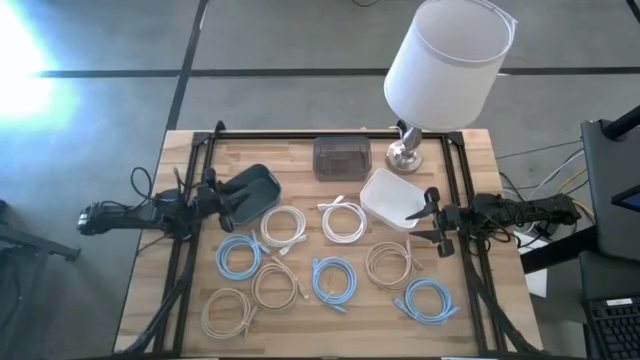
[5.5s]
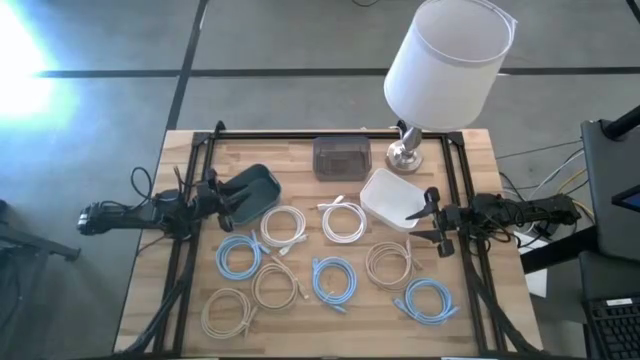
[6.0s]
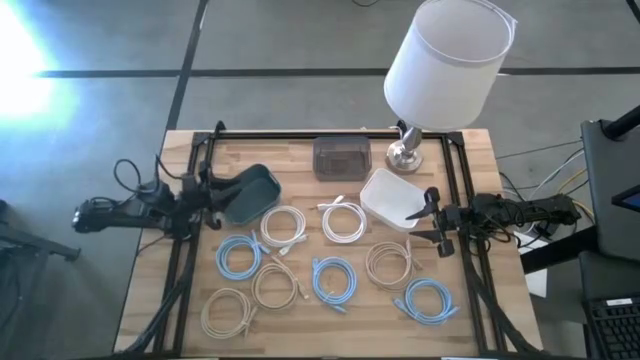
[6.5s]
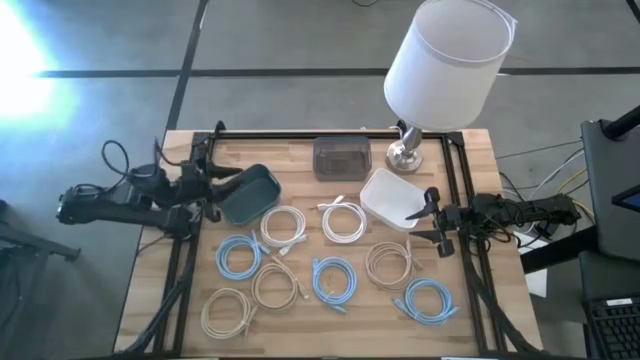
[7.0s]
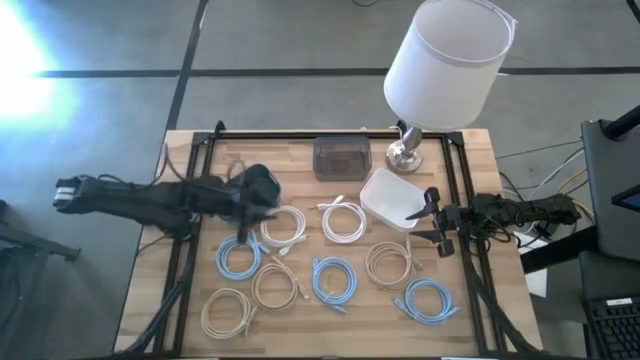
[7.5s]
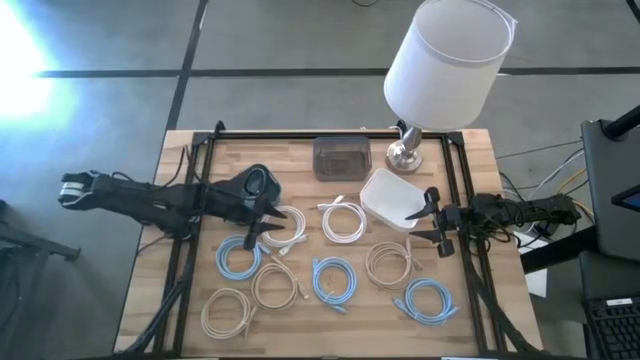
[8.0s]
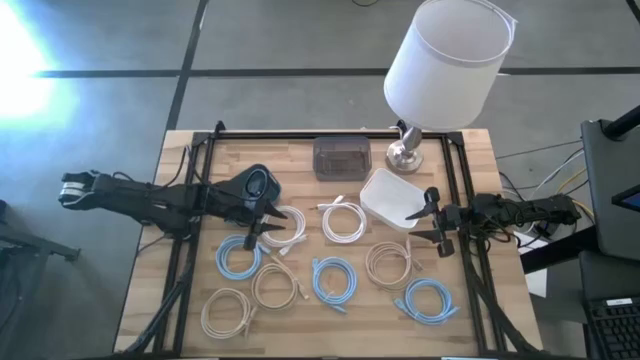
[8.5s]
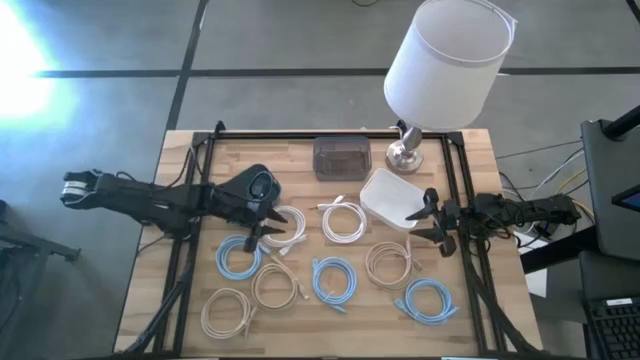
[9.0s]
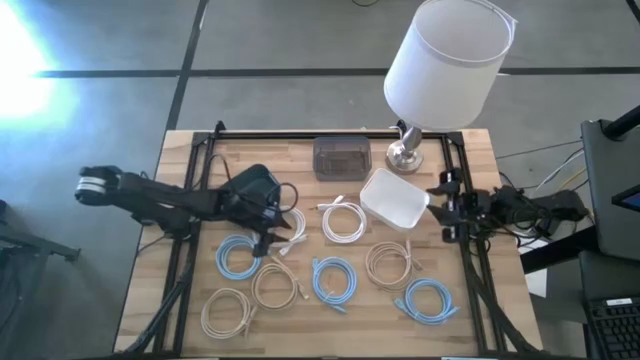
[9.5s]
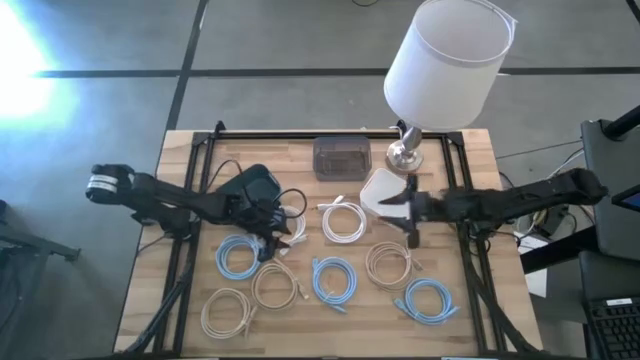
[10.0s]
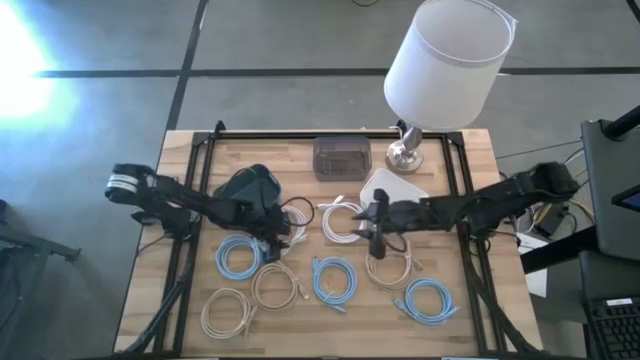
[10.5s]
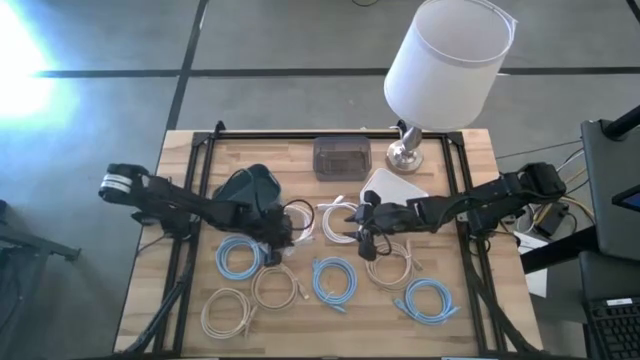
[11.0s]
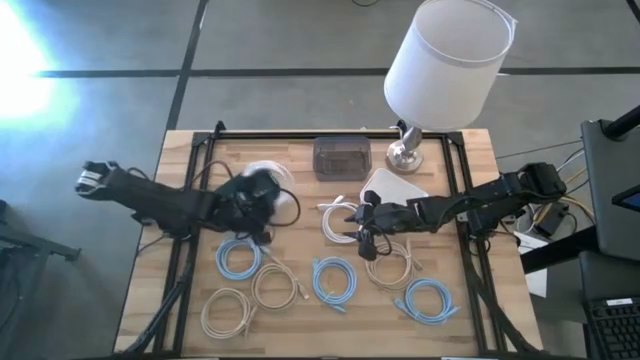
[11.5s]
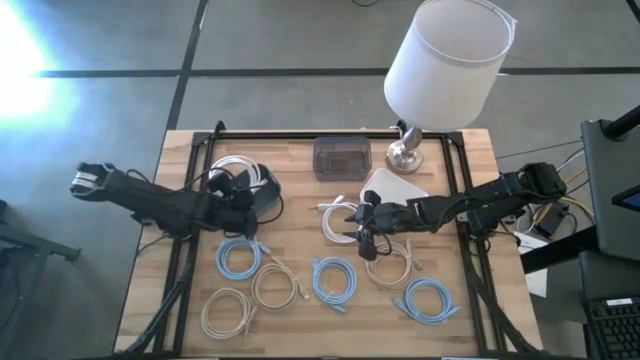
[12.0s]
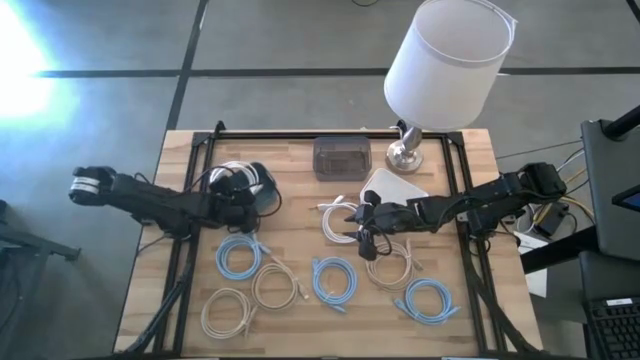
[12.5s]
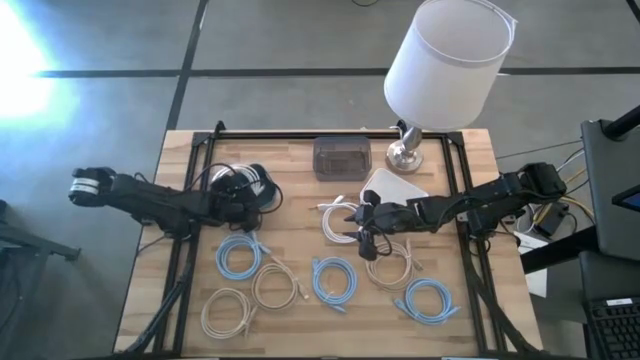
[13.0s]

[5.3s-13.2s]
Task: Sort HDMI cables
Put the left white HDMI cable into the blue bin

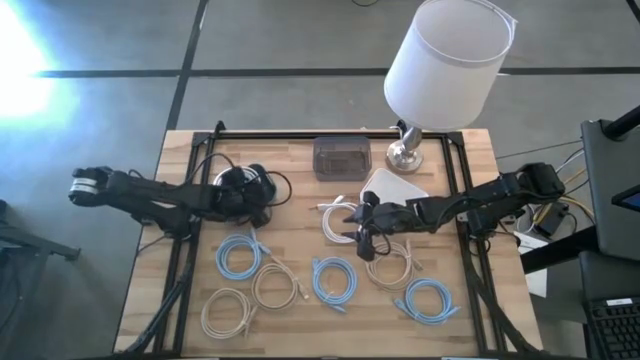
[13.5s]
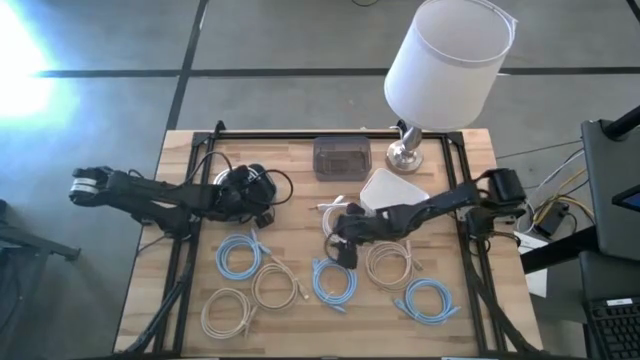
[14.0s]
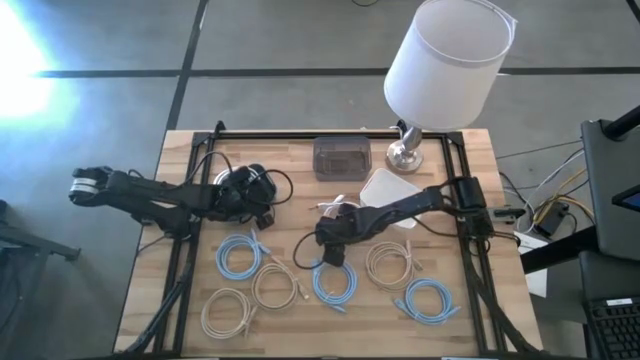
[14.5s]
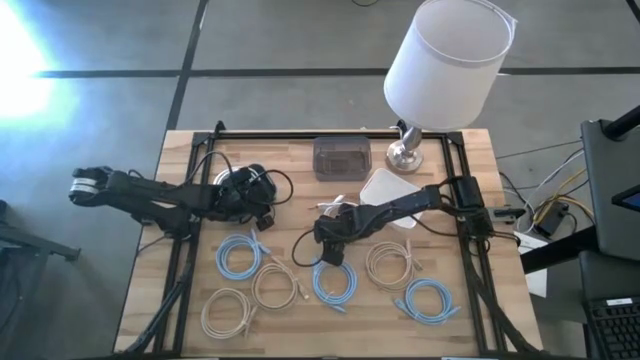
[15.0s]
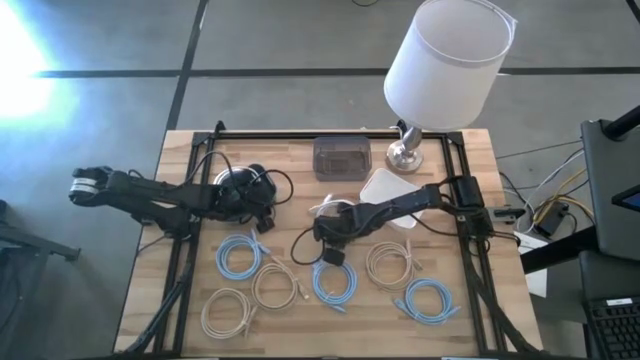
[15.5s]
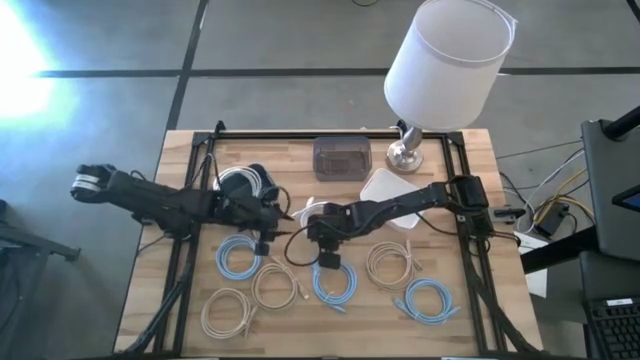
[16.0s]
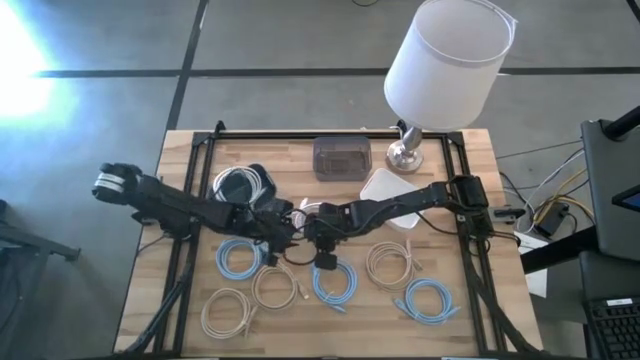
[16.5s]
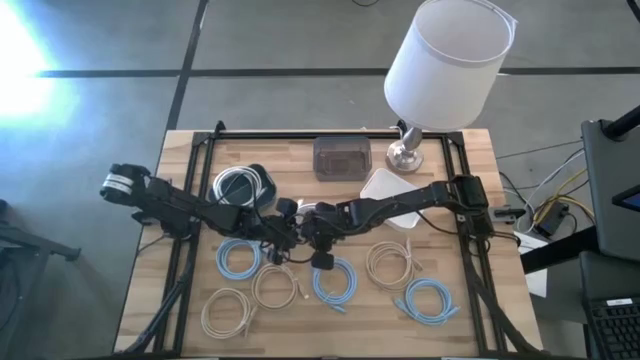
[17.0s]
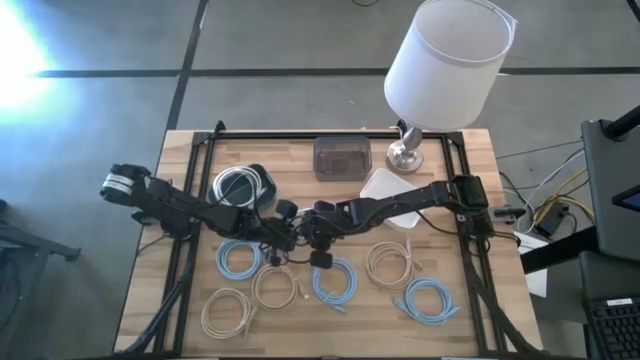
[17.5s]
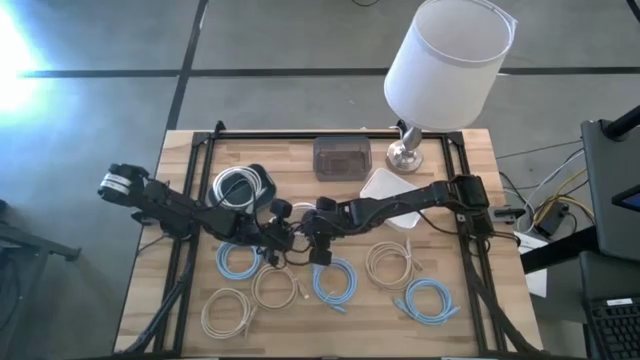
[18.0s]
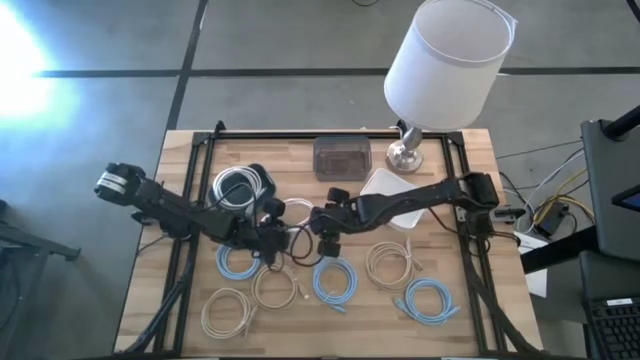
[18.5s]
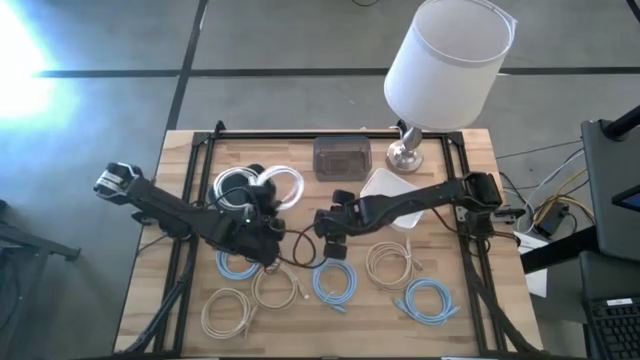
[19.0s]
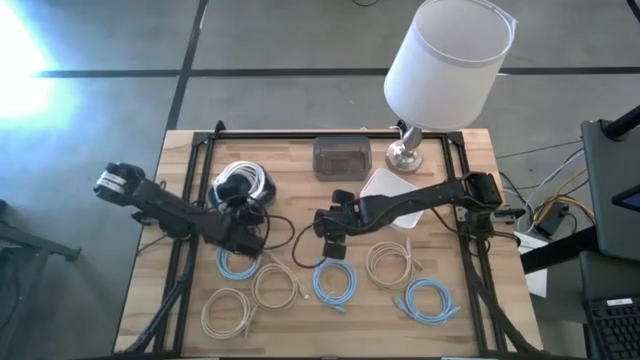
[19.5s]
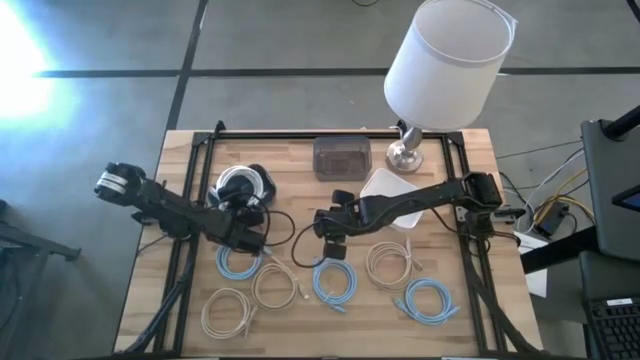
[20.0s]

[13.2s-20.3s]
Put the white HDMI cable into the blue bin

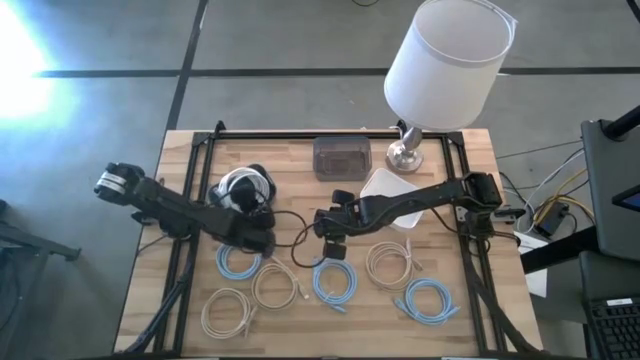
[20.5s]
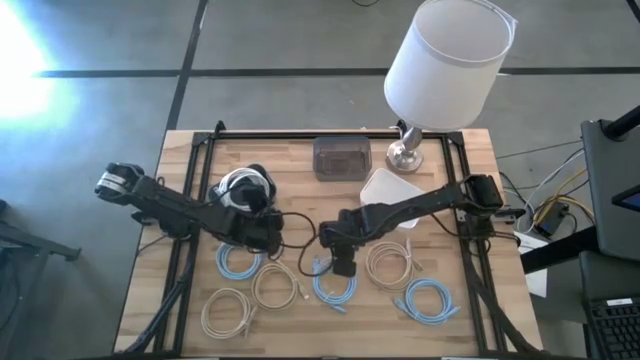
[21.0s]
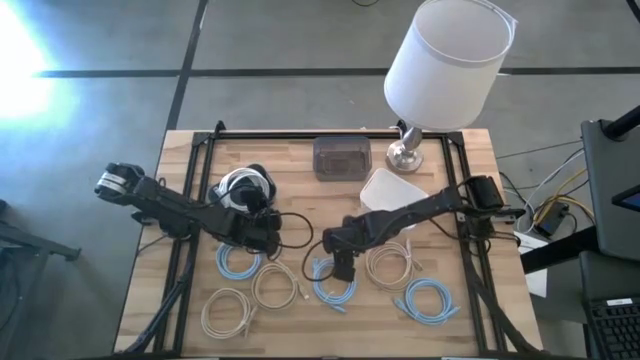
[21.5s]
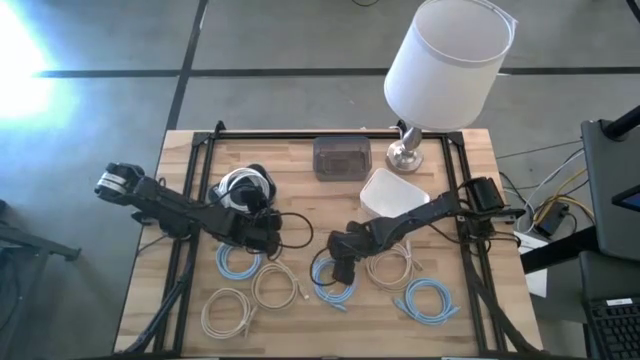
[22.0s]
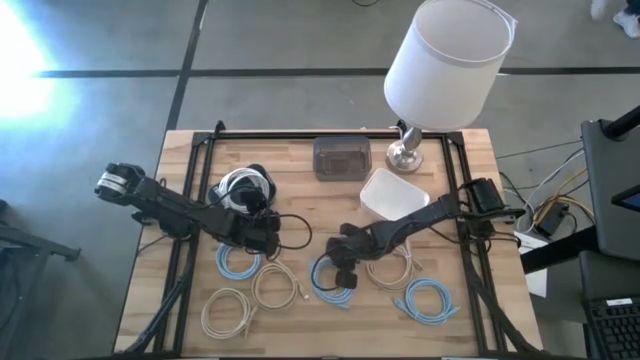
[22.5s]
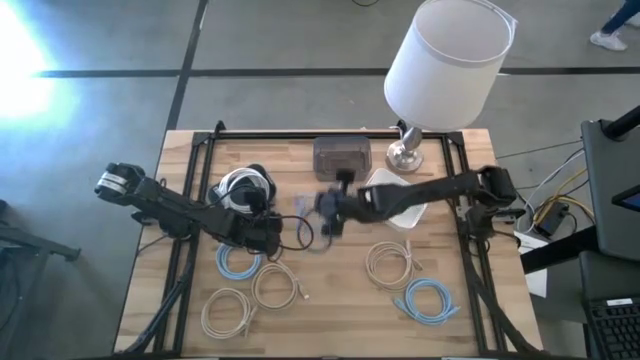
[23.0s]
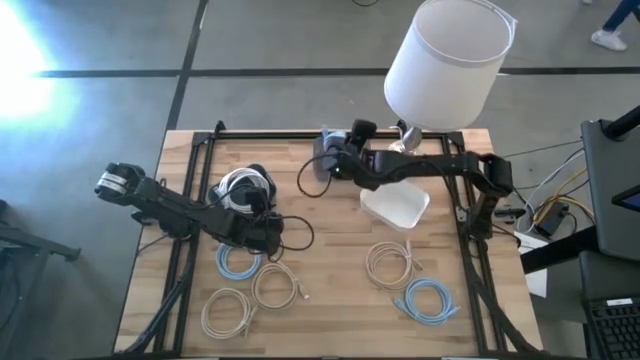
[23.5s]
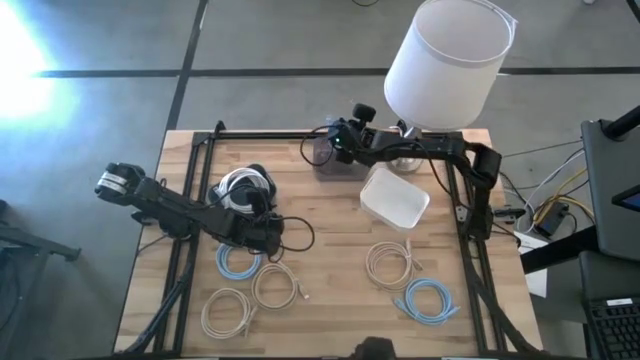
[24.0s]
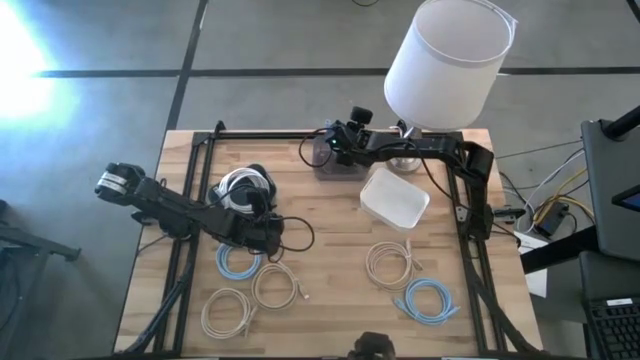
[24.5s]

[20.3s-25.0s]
Put the middle blue HDMI cable into the black bin

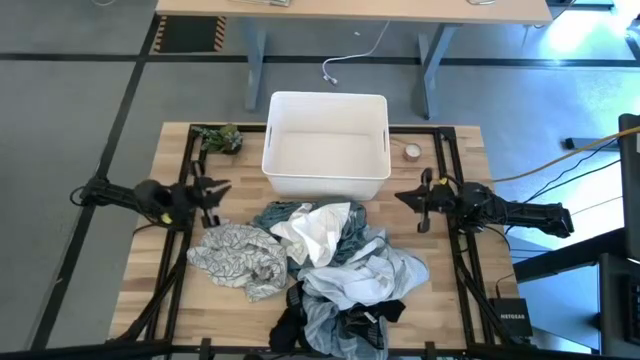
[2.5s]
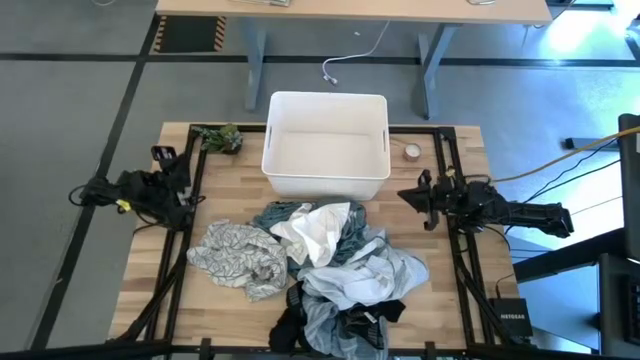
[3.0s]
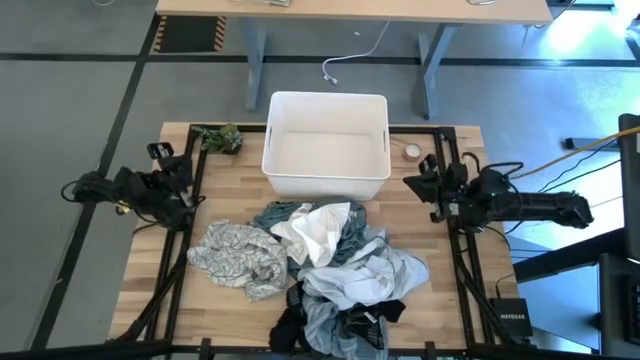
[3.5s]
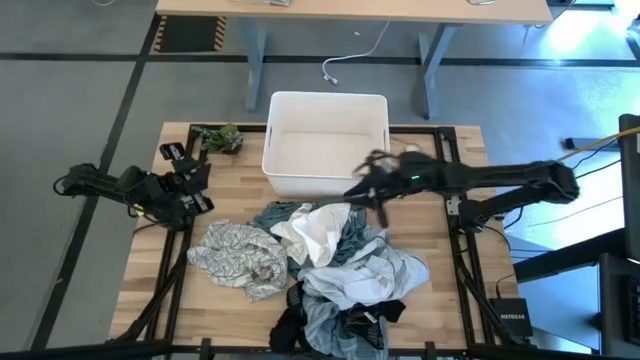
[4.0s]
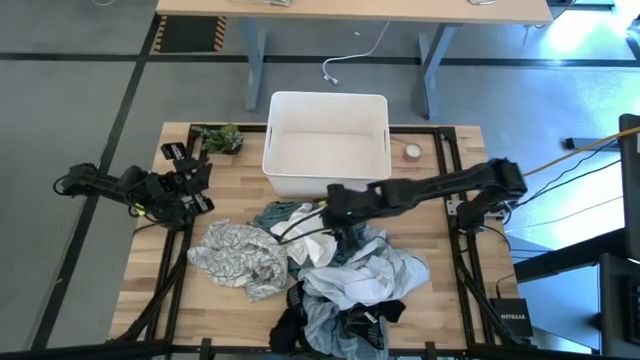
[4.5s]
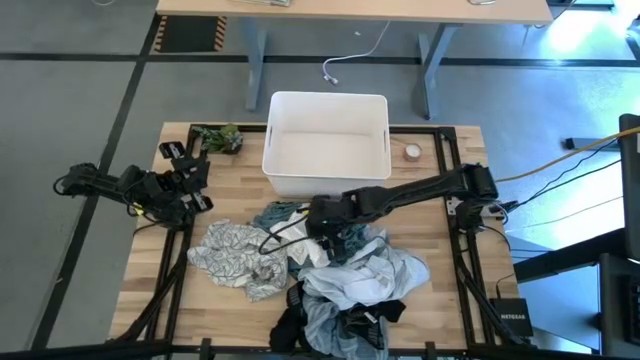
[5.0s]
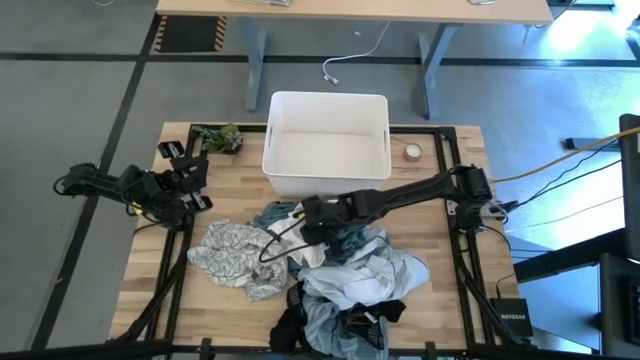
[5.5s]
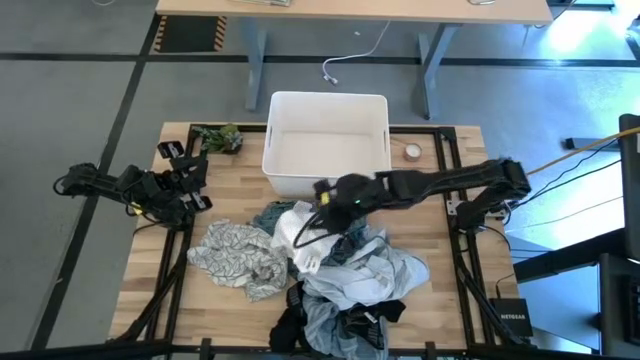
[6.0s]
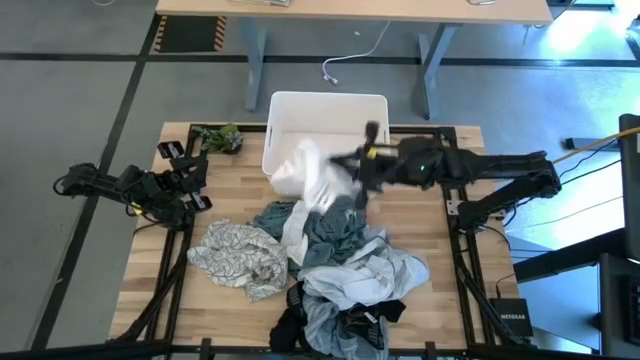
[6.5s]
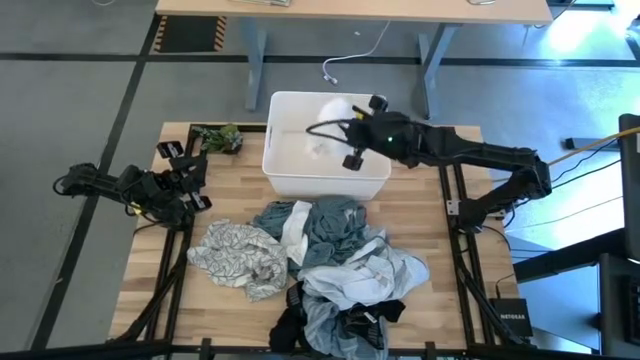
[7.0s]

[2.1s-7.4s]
Task: Sort clothes
Put the white towel into the white laundry bin
